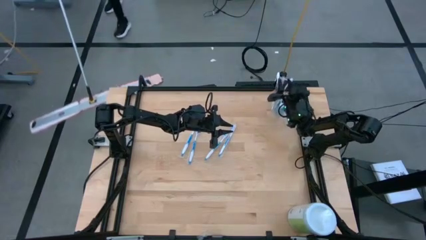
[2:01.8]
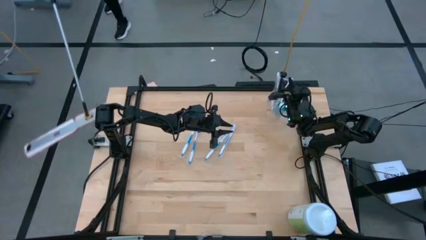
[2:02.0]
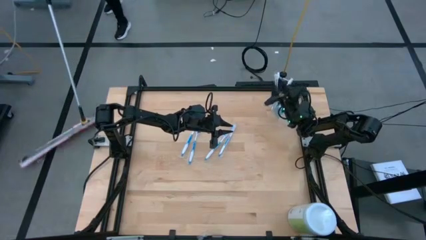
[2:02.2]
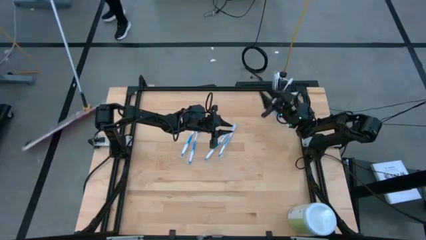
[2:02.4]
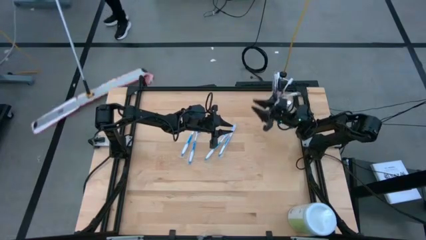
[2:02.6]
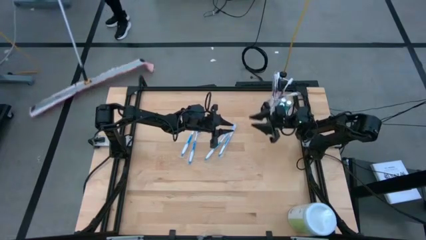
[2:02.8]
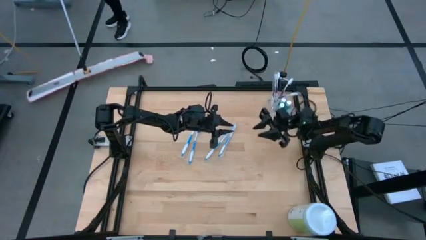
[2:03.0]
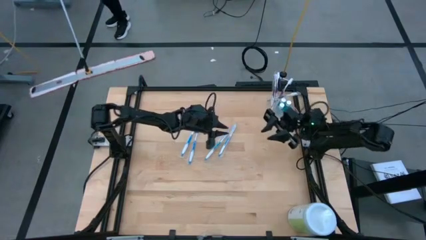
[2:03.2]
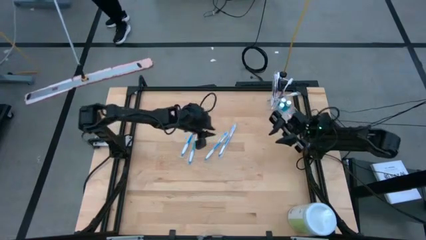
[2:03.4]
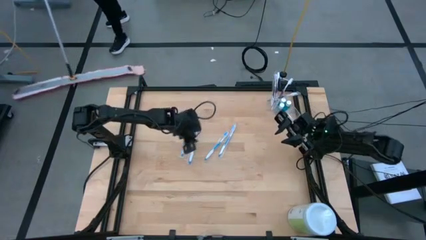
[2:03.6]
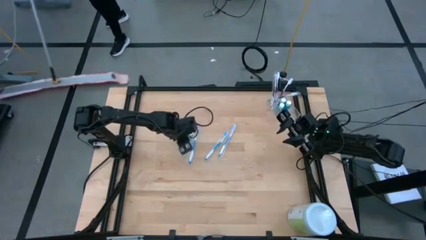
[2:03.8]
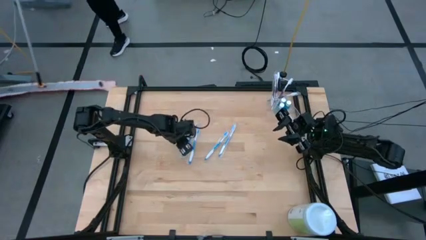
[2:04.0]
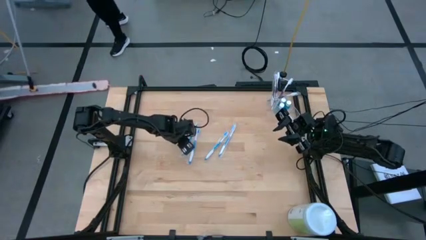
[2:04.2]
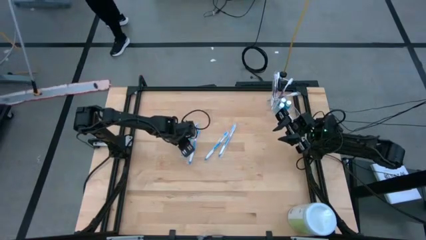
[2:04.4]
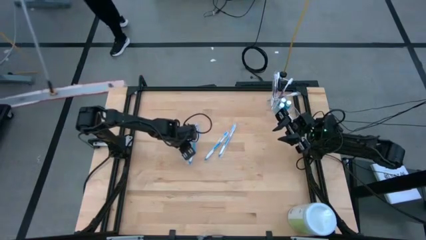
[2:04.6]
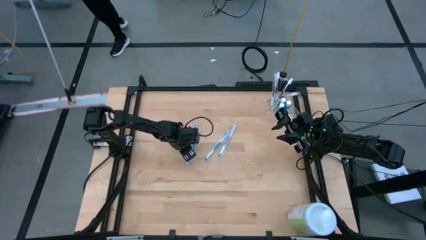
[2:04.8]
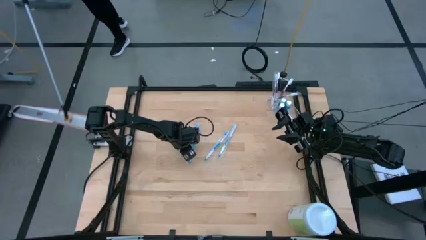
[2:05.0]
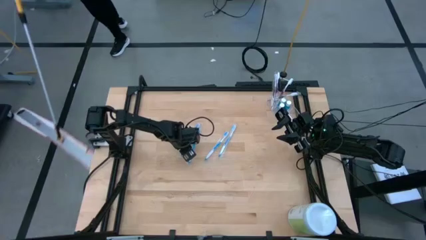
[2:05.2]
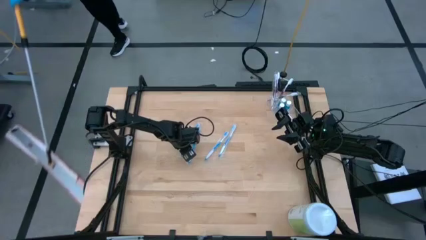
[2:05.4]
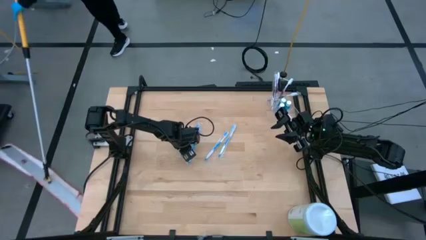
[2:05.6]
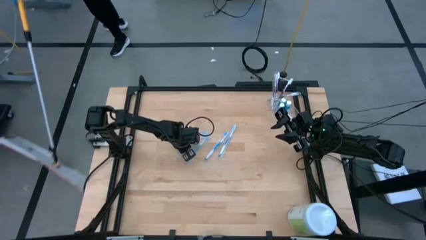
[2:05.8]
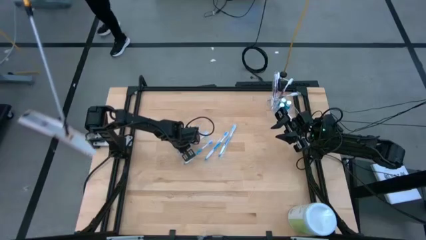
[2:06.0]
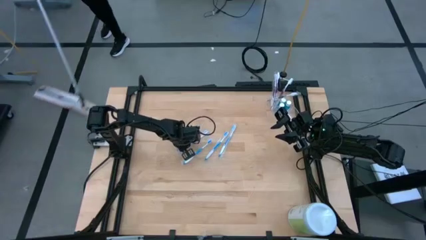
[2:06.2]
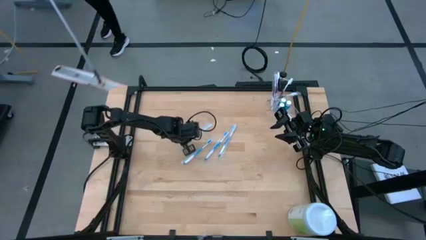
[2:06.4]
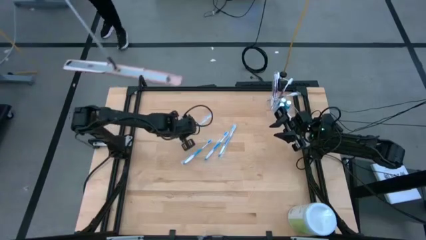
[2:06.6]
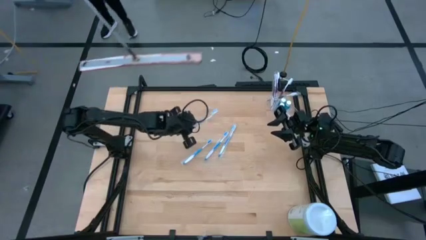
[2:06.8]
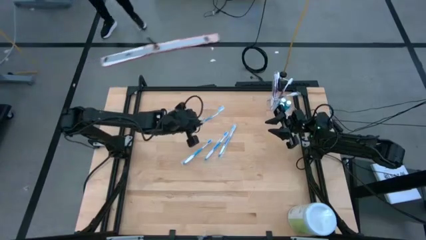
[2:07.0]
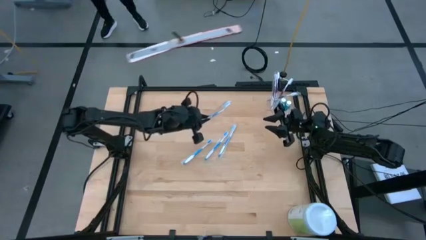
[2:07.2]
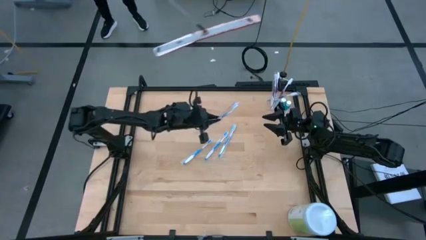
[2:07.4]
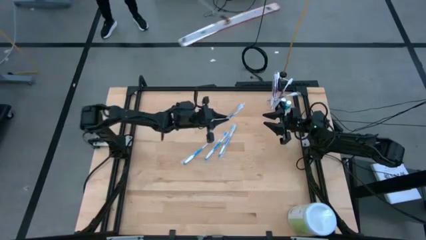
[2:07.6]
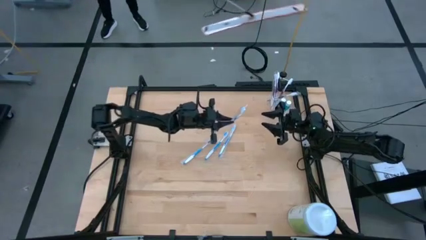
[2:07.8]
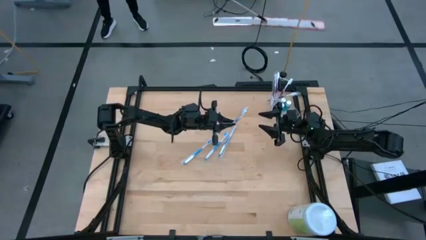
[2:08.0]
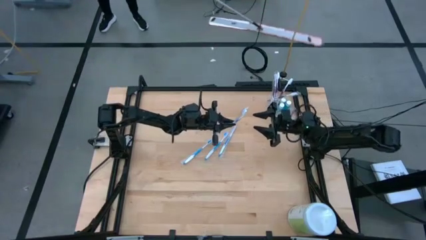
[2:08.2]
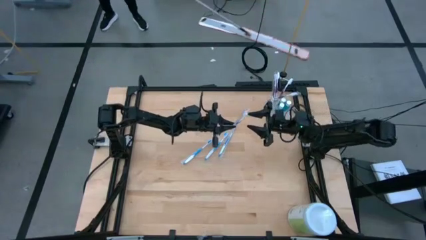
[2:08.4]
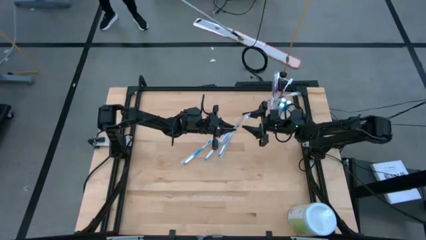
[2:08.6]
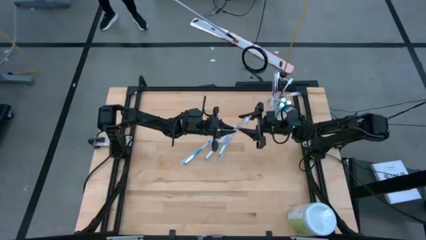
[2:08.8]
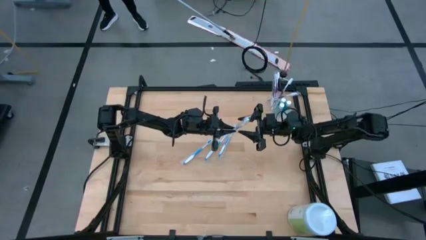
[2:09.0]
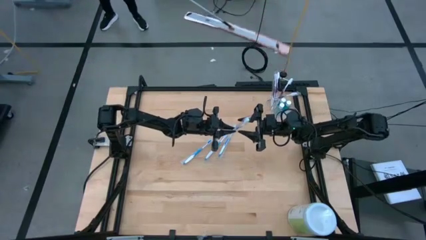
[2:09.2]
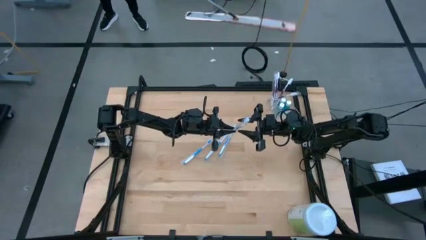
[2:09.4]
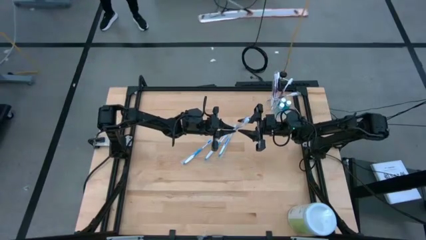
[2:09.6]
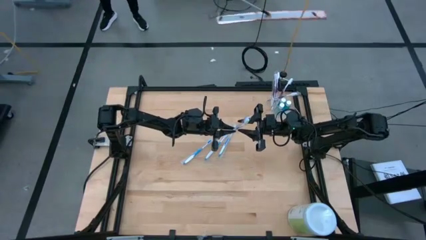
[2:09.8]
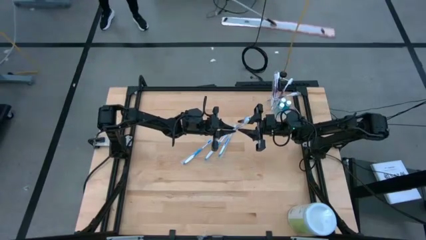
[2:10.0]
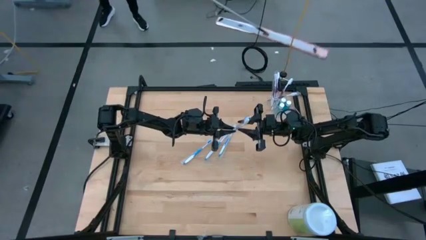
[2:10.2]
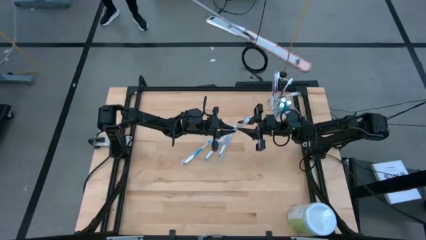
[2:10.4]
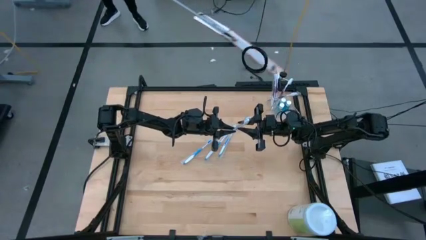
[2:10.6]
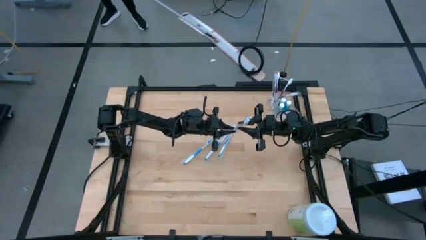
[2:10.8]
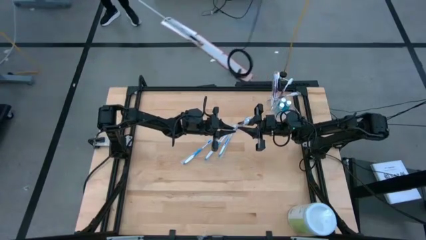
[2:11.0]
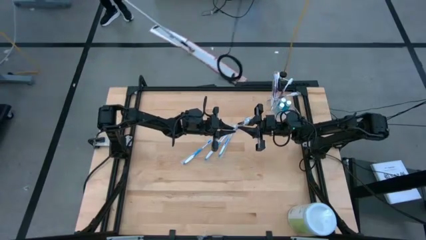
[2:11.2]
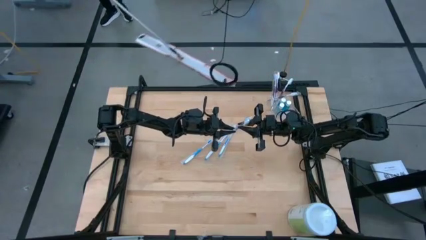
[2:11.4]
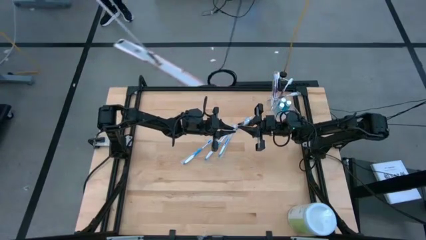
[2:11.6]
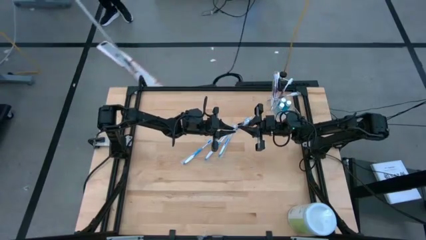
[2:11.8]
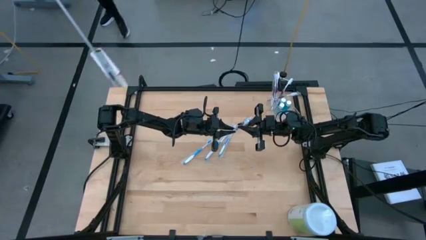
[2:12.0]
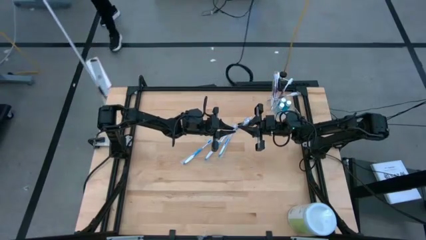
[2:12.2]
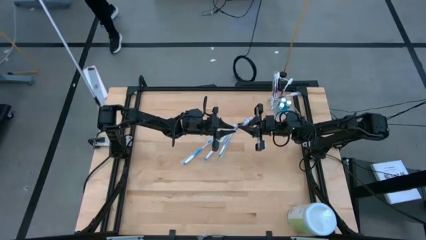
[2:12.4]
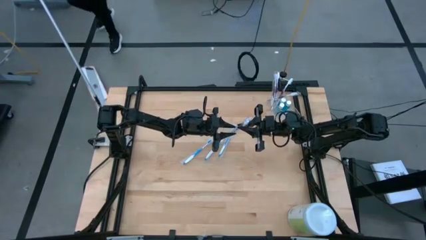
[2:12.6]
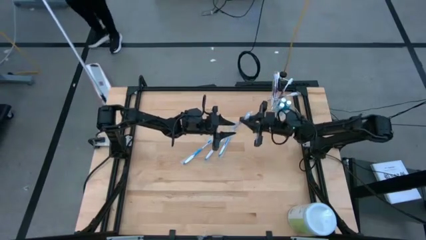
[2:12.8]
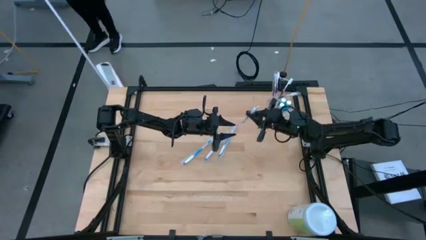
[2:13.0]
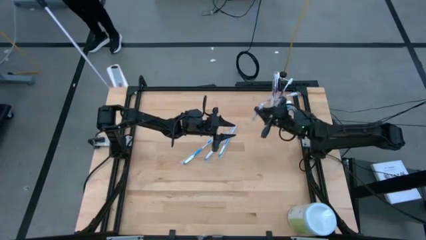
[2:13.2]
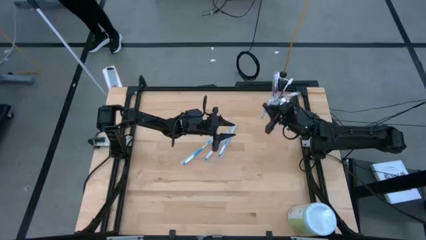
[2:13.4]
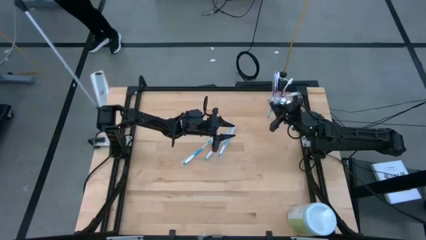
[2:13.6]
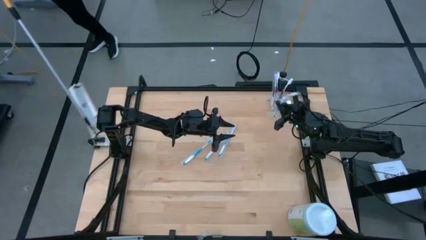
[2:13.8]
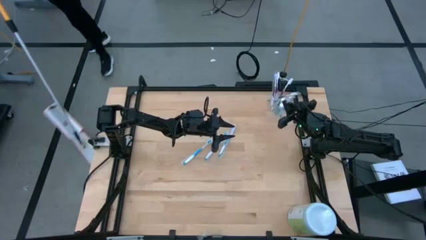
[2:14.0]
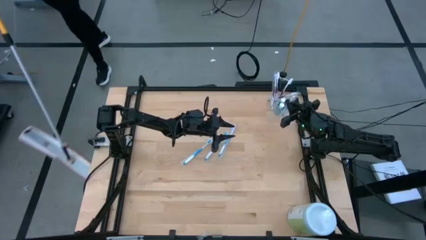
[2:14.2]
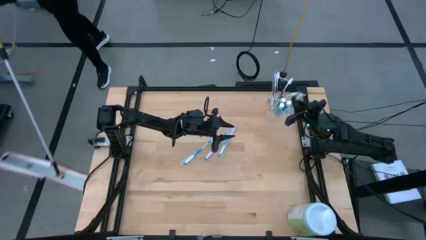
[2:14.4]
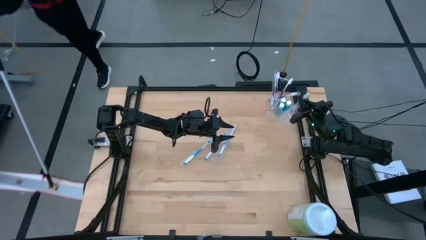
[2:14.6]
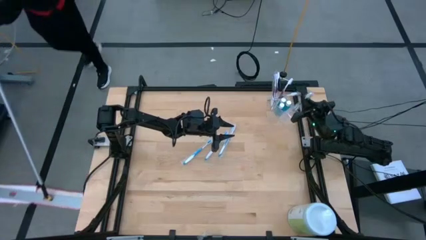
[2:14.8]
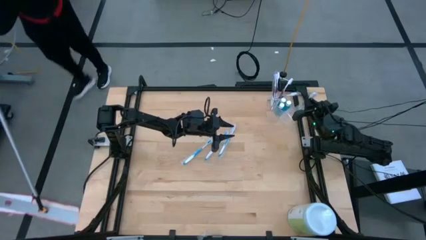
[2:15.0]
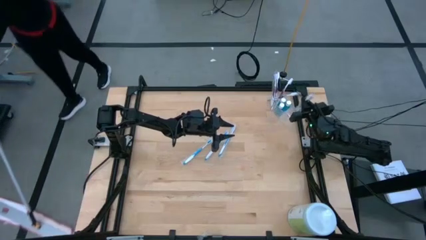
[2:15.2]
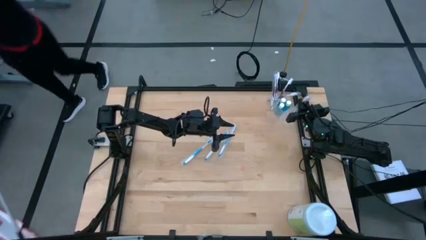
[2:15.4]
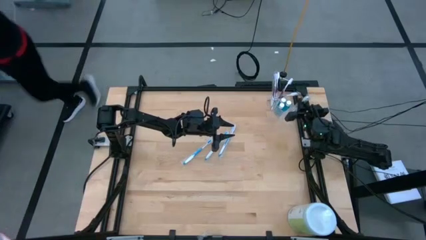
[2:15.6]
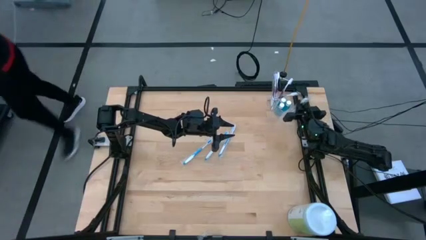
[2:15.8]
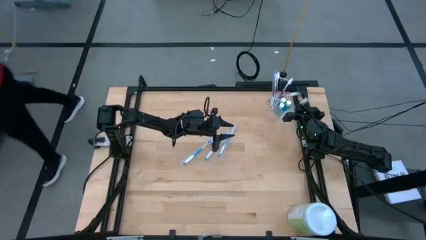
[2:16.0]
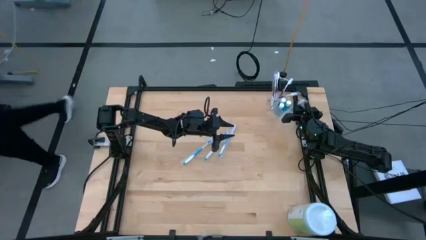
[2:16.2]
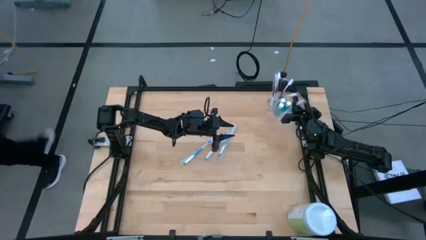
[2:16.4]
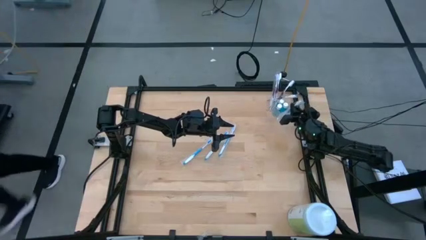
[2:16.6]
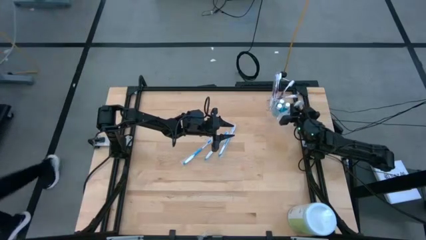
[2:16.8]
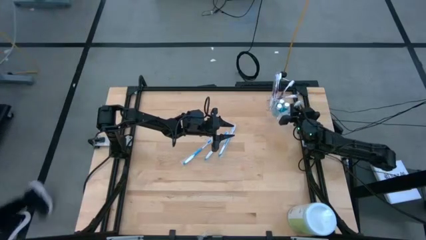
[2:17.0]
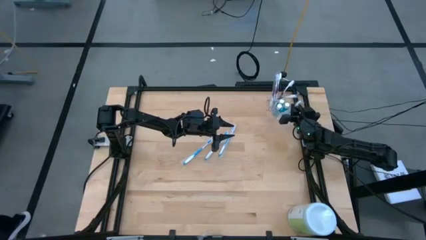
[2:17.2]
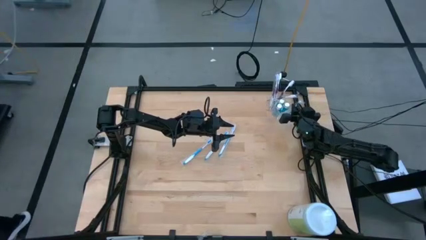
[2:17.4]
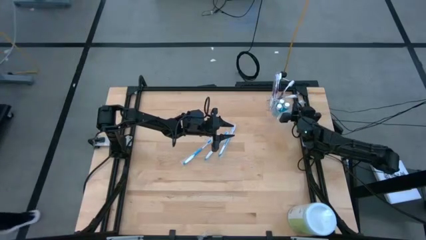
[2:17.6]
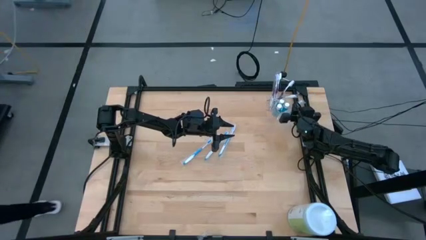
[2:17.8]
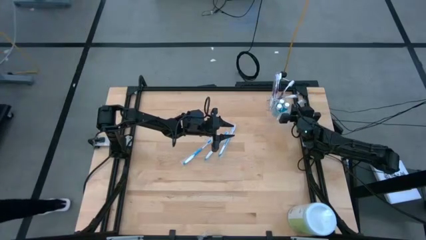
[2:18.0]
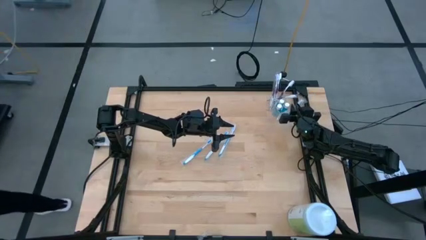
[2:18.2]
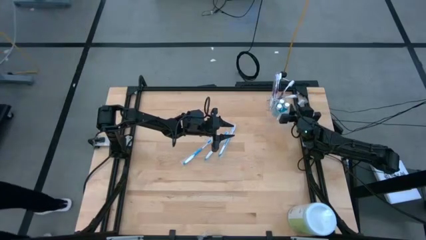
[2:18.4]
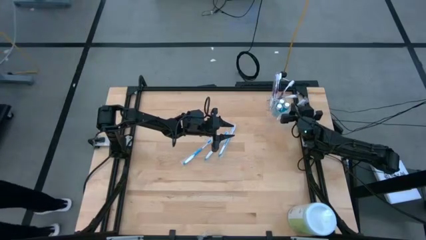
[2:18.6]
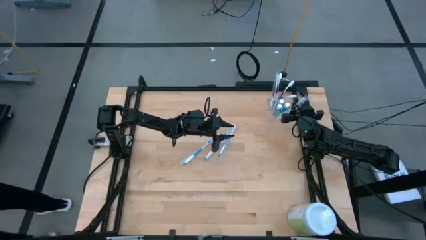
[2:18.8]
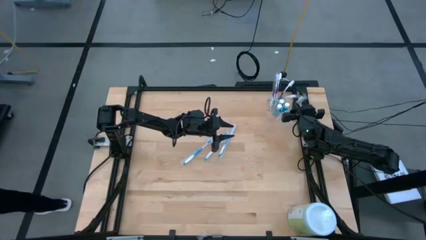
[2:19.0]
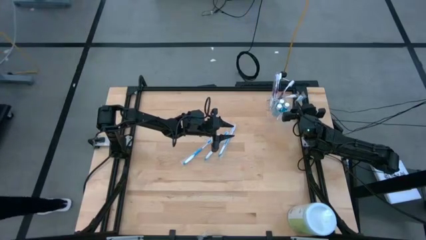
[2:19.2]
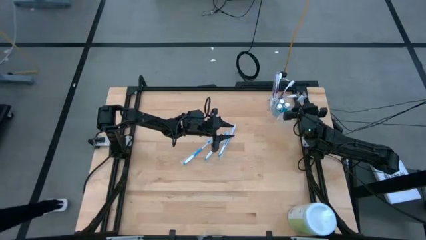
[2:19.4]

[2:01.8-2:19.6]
Task: Pick & Place toothbrushing station
Put the blue toothbrush into the right of the transparent organizer
